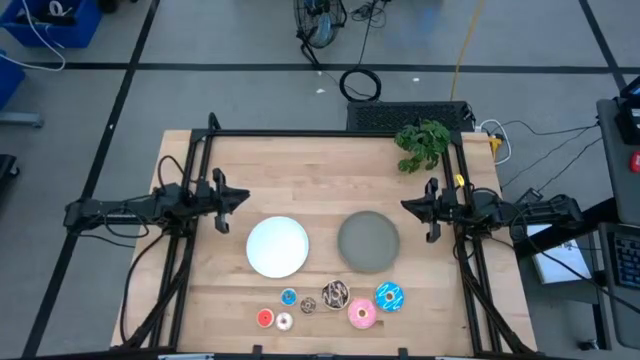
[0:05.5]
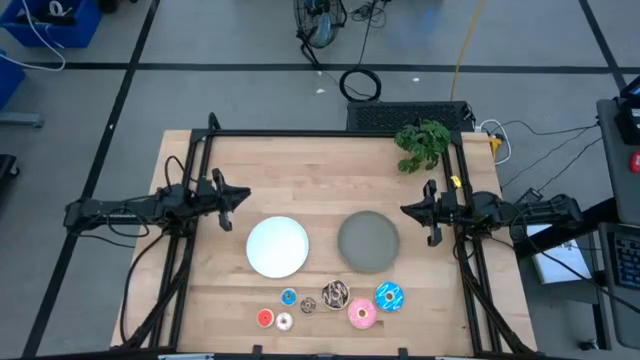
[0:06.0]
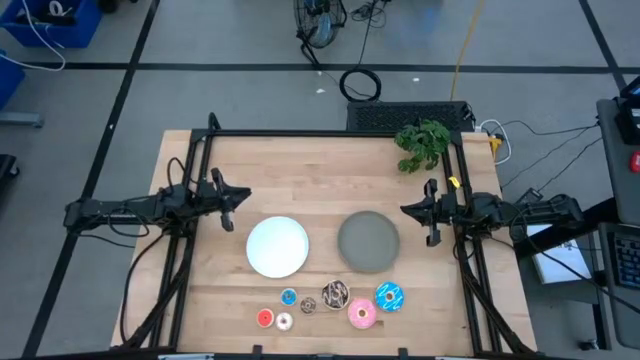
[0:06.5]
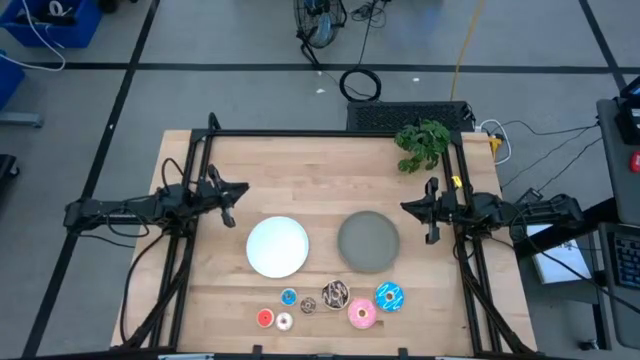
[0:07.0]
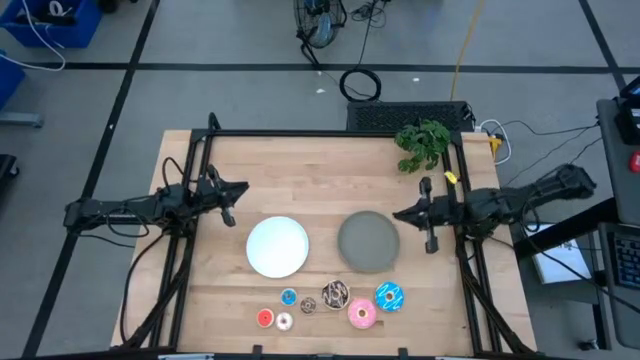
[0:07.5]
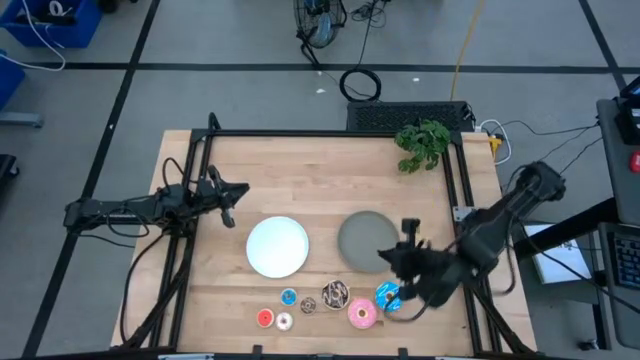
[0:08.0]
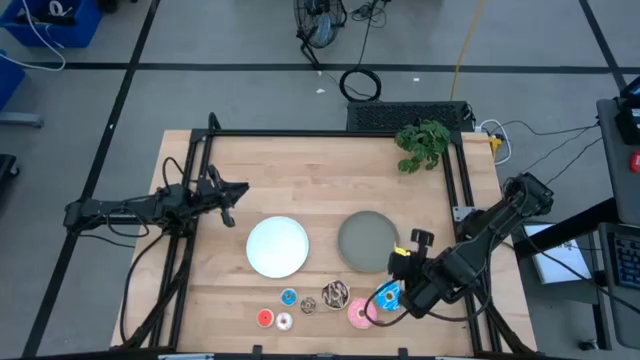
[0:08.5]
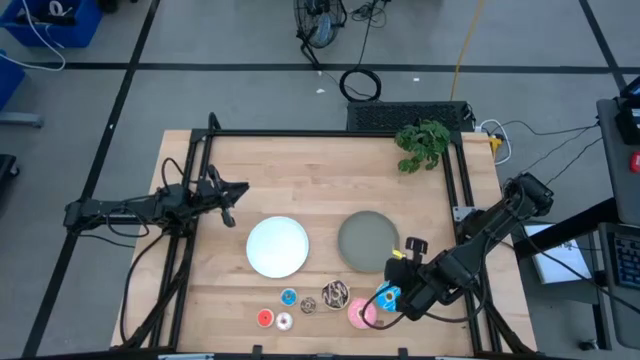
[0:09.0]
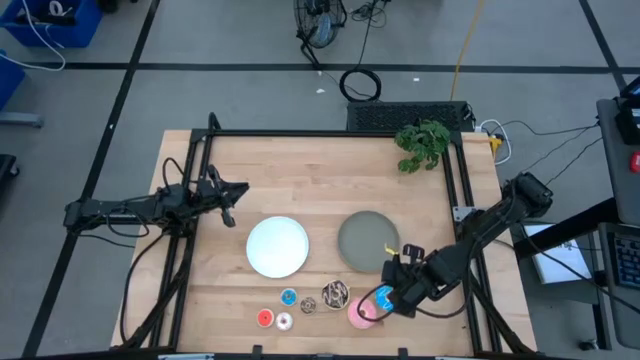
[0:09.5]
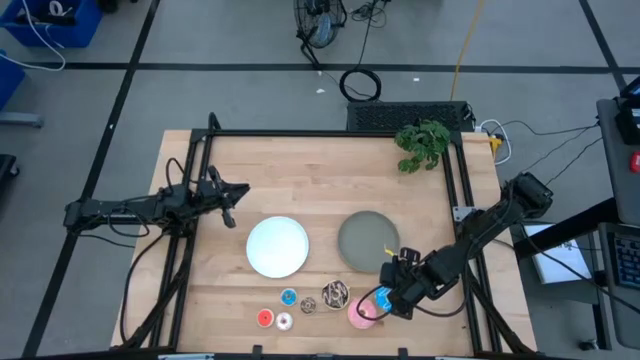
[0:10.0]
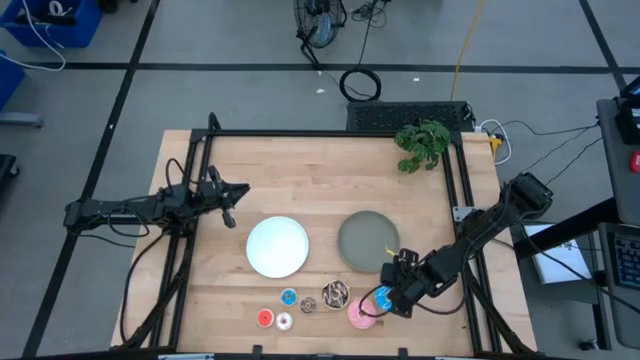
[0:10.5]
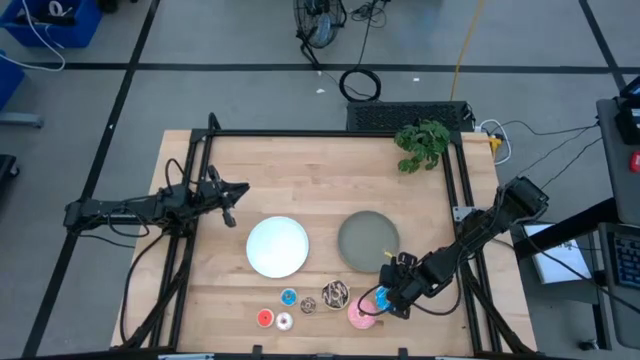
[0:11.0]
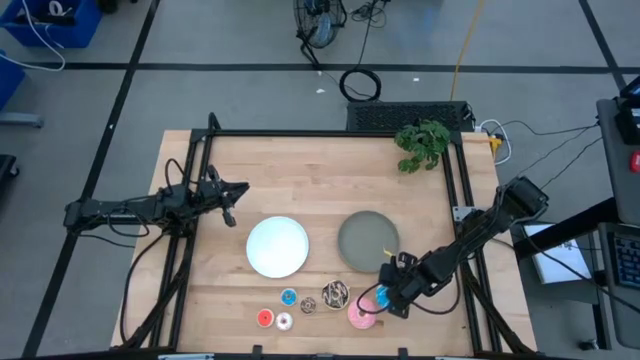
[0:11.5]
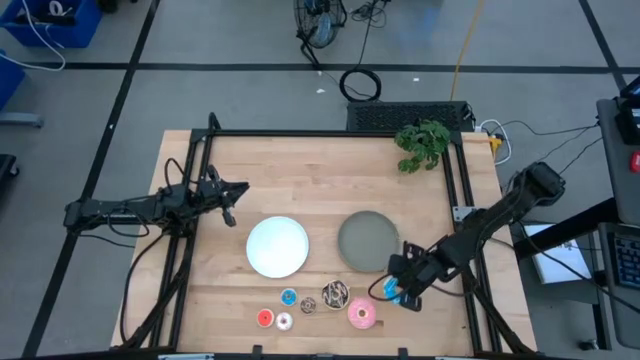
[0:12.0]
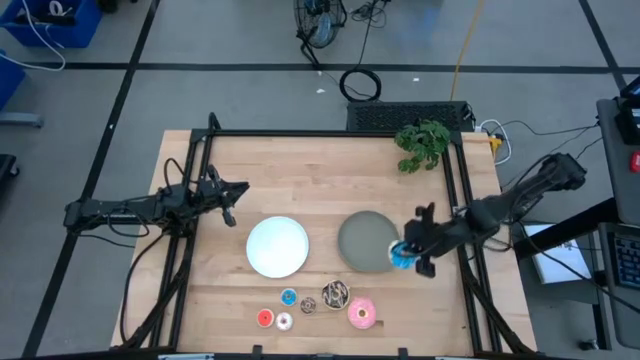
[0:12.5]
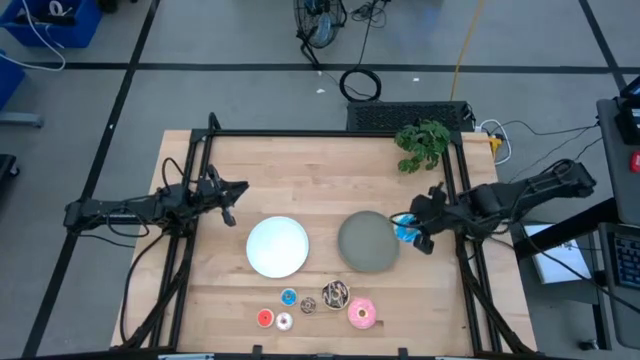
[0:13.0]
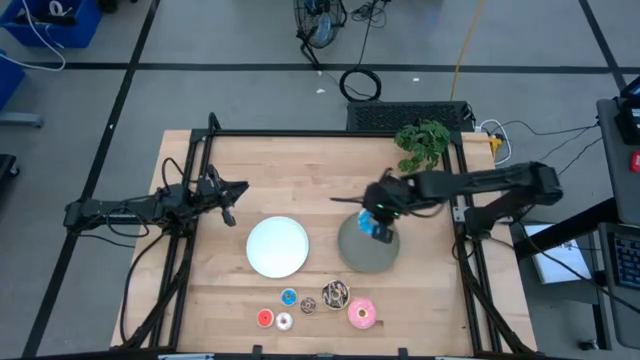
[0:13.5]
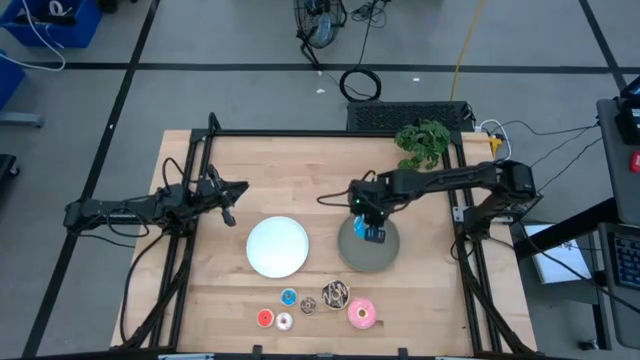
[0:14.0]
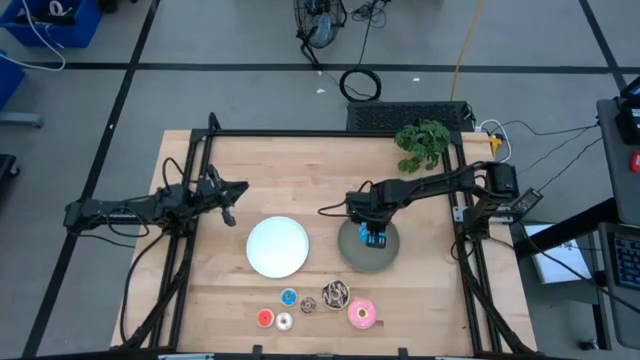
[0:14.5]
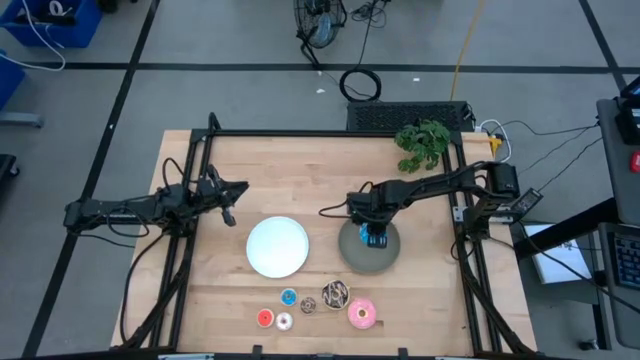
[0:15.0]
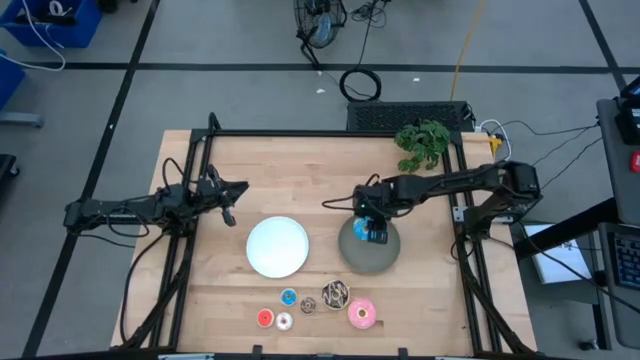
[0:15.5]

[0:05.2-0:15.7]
Task: Pick & Place donuts
Put the large blue donut on the gray plate

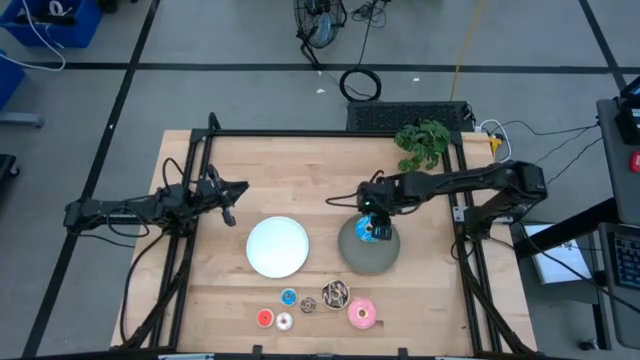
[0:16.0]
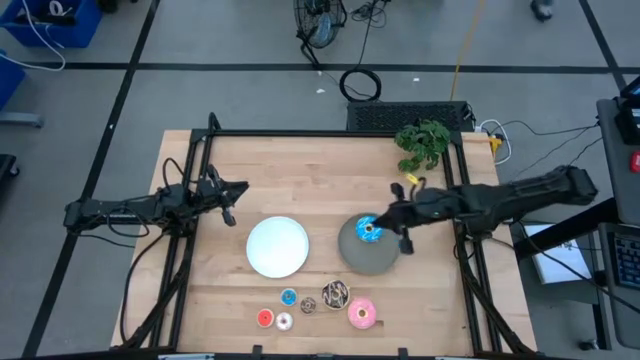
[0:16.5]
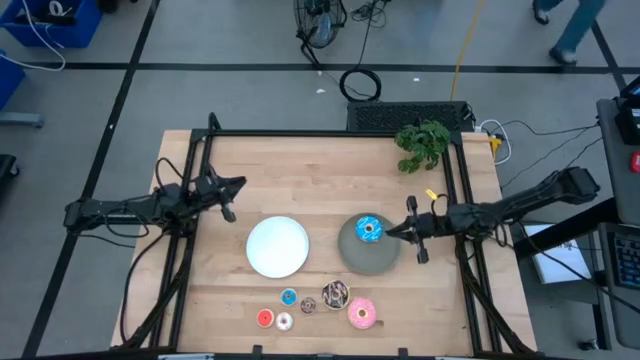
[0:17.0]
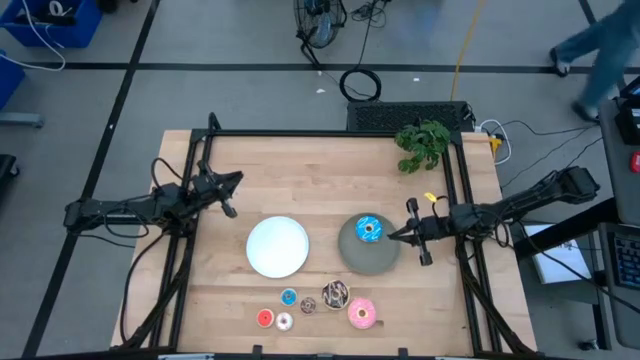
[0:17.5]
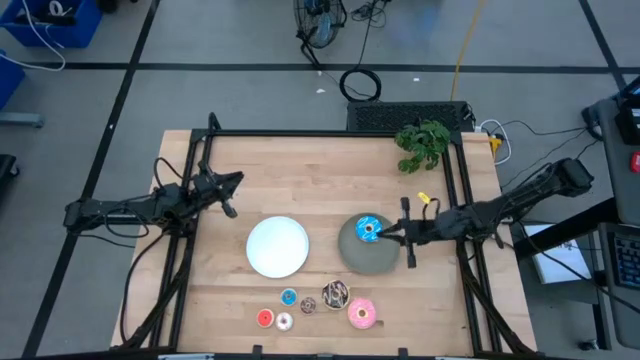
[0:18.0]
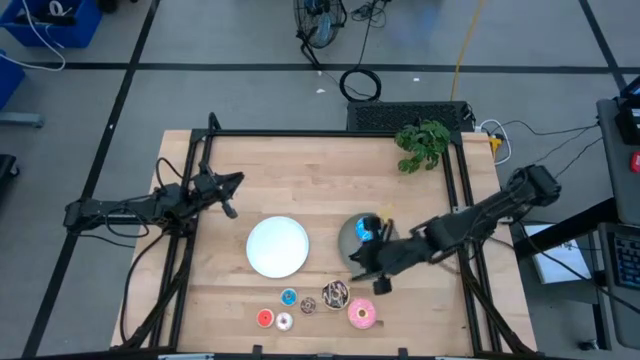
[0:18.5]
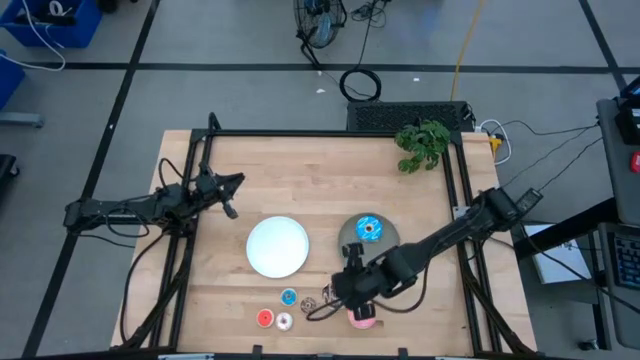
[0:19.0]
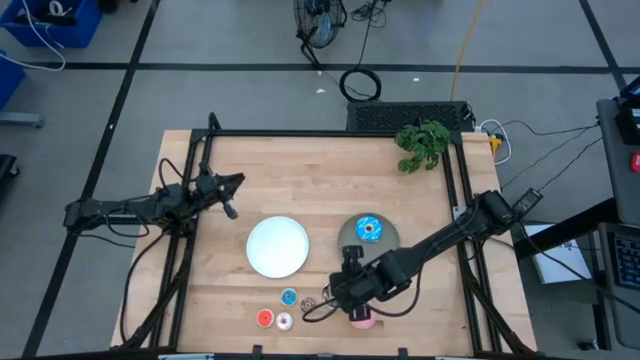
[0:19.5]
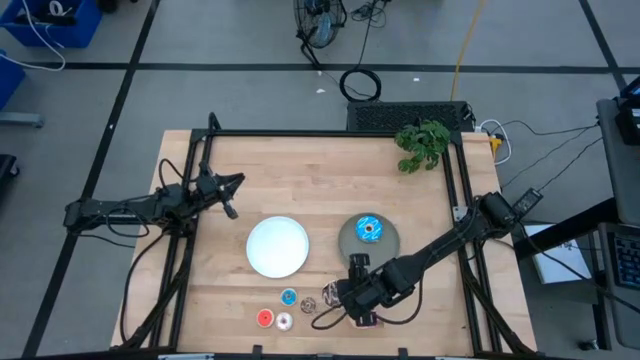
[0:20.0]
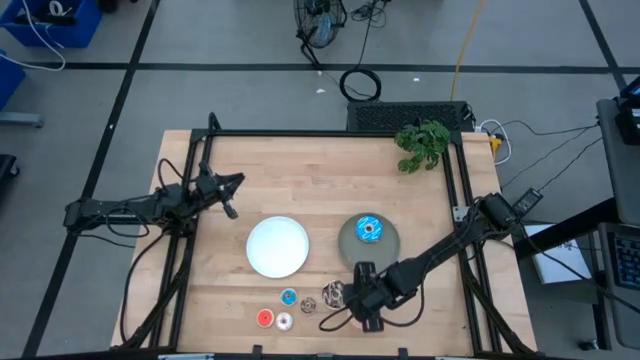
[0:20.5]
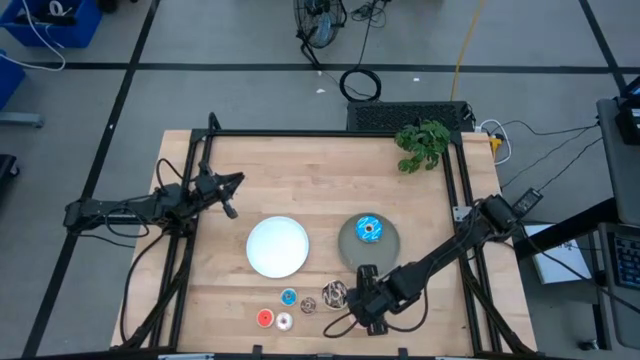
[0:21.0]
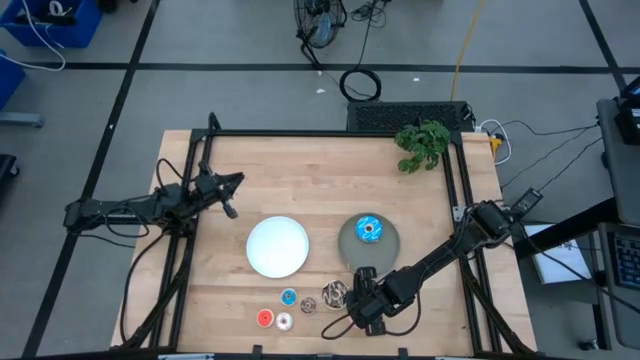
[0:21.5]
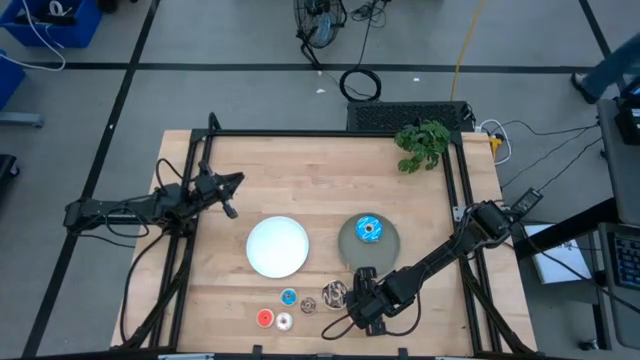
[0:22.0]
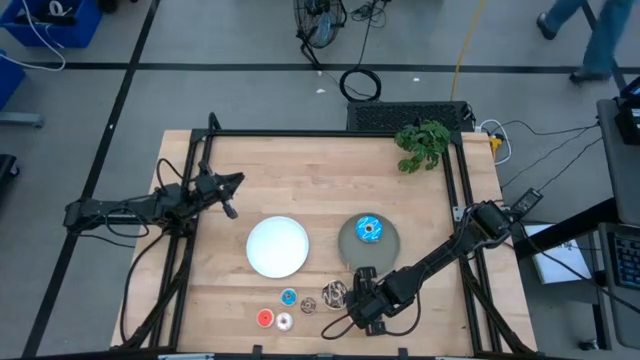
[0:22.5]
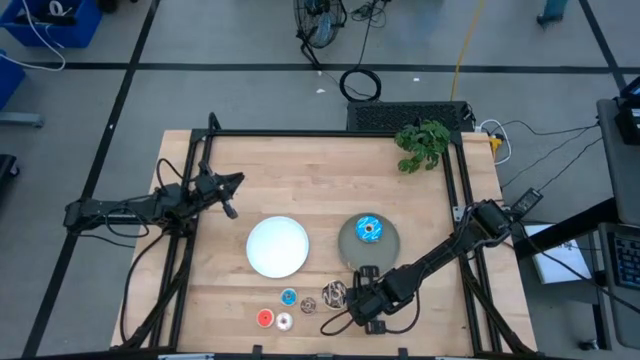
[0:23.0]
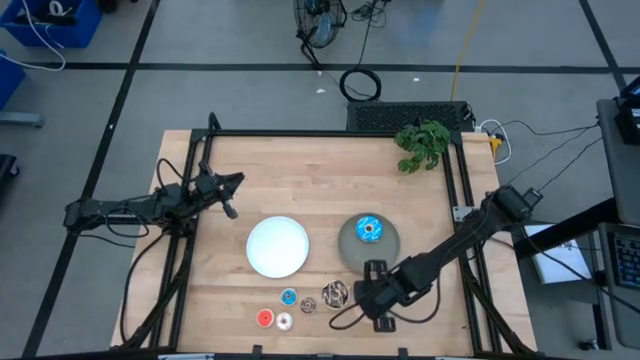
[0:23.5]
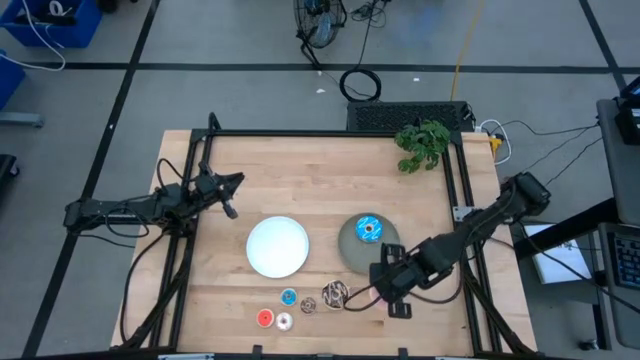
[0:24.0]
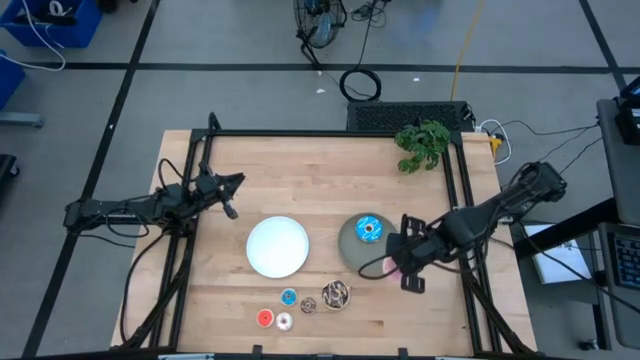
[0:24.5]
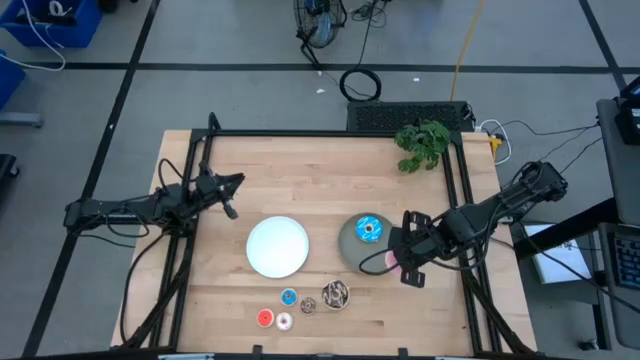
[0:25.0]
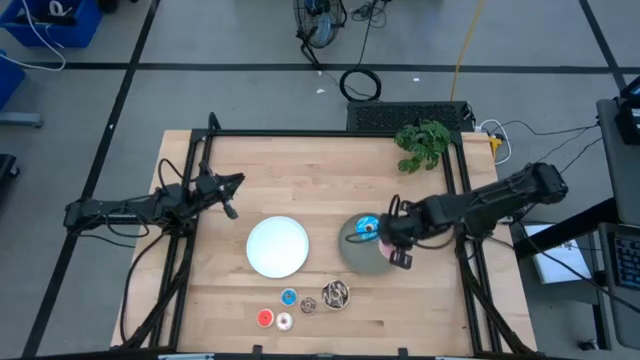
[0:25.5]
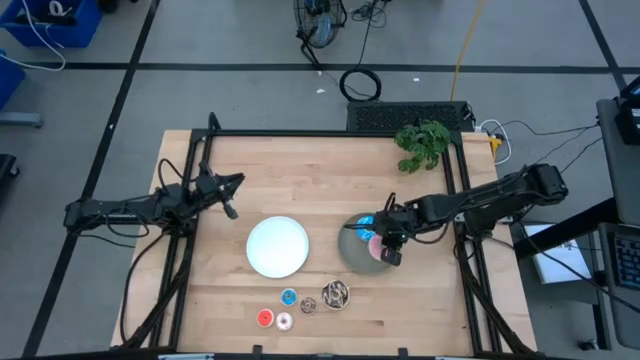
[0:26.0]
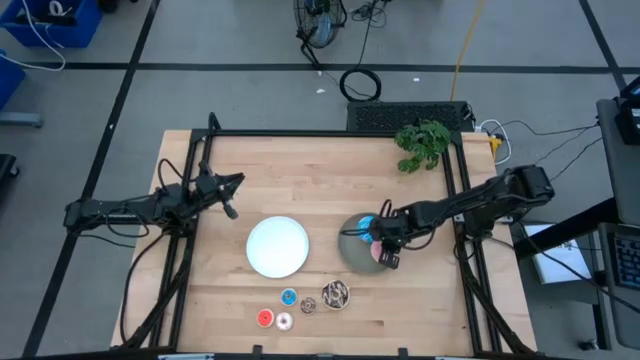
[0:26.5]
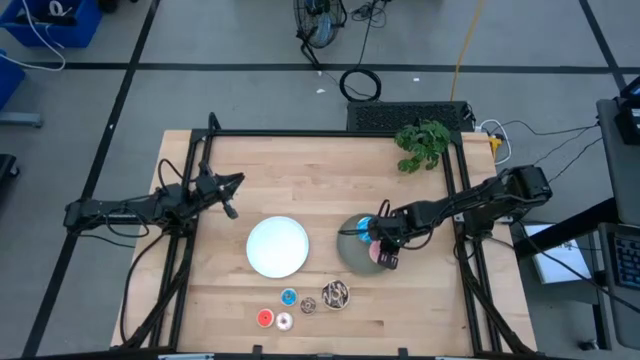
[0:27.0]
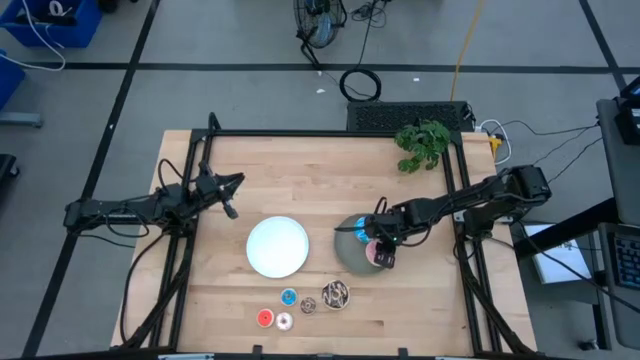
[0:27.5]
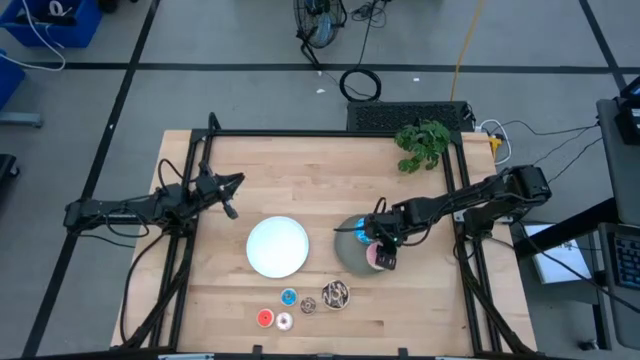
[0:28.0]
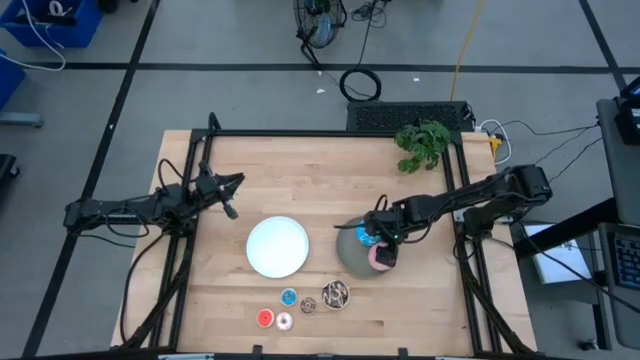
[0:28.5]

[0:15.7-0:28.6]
Put the large pink donut on the gray plate
